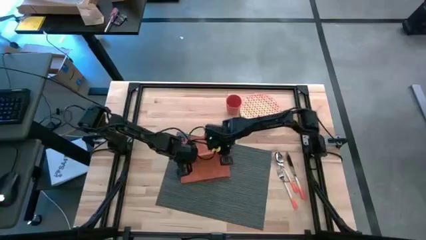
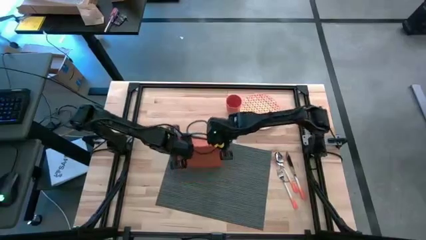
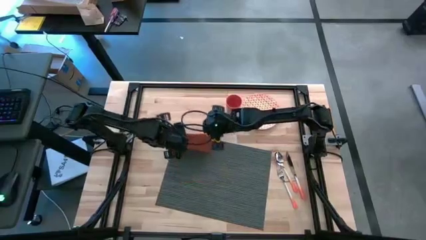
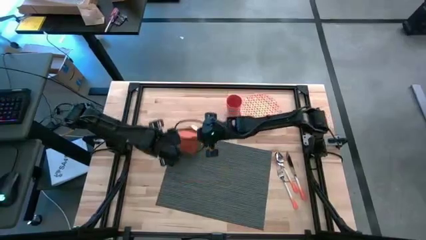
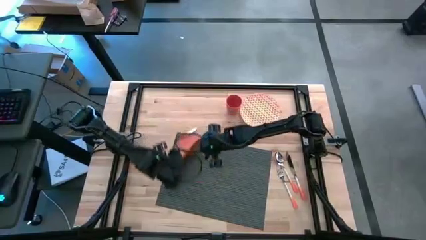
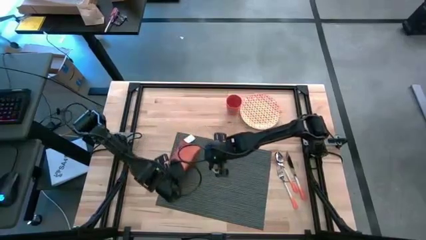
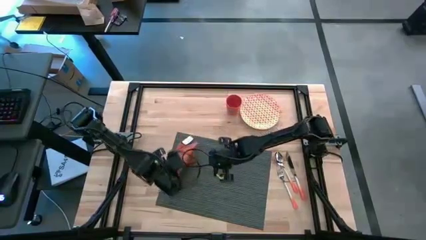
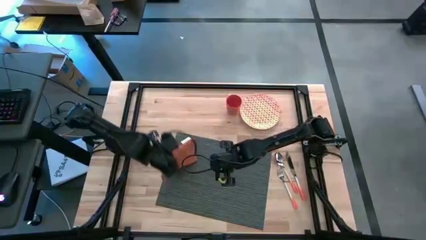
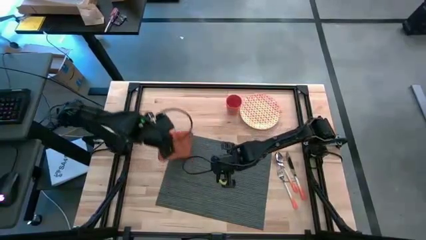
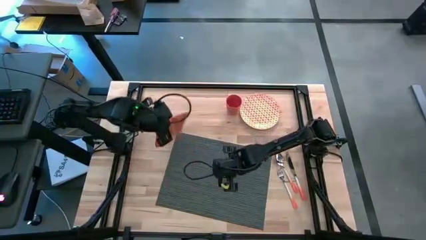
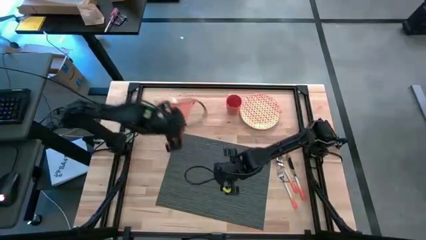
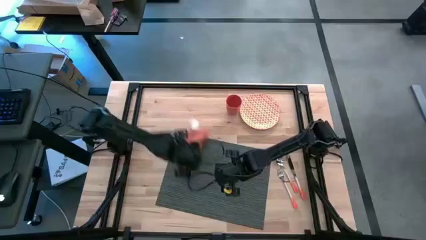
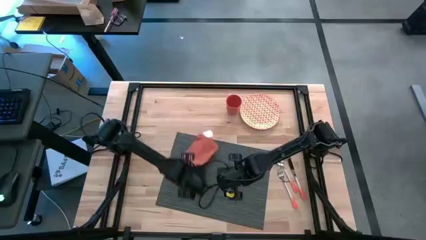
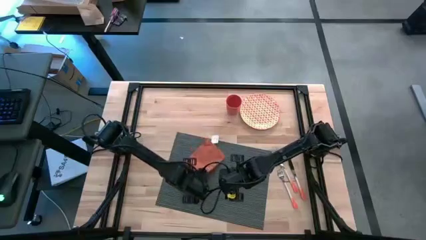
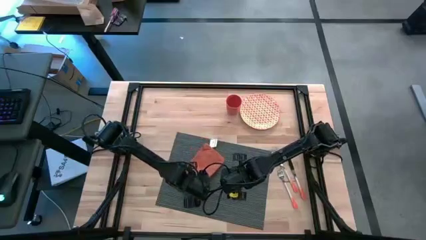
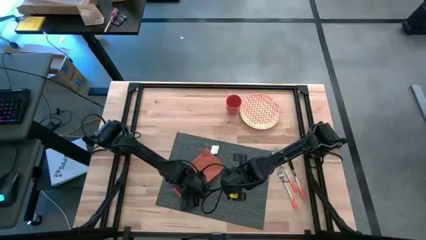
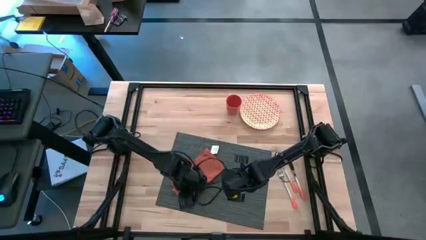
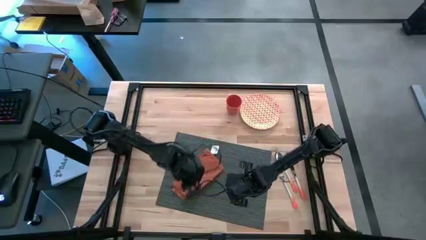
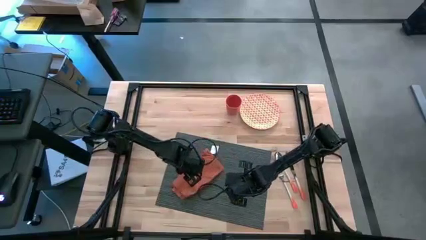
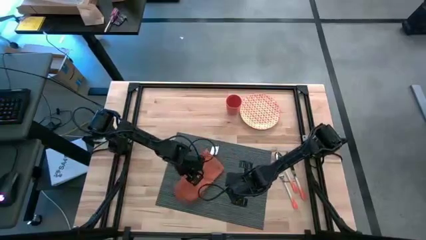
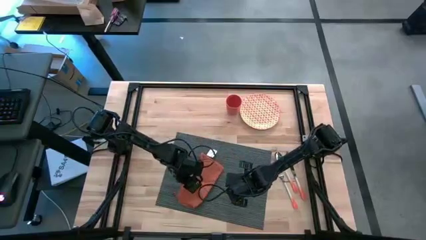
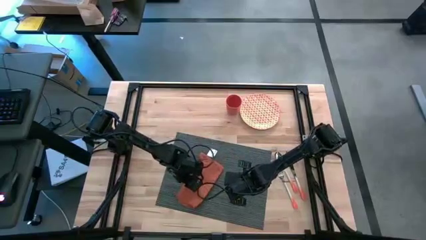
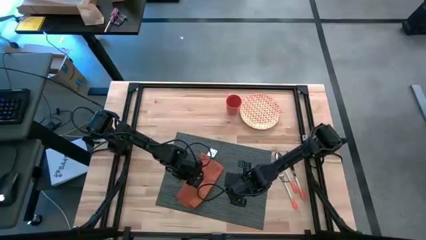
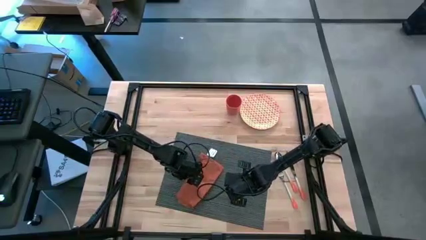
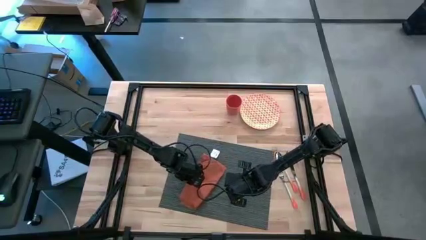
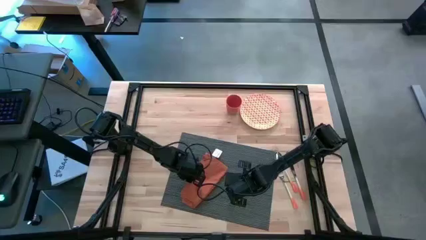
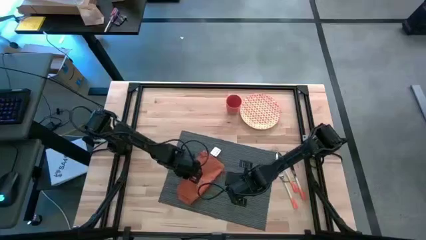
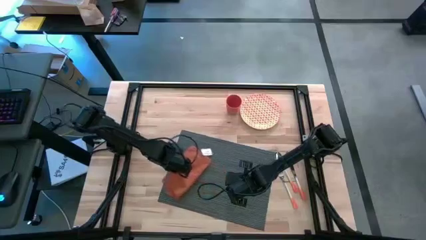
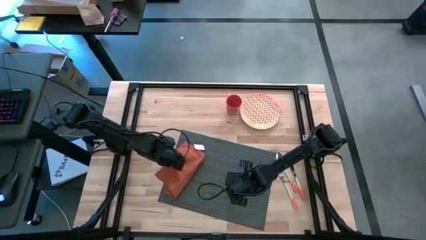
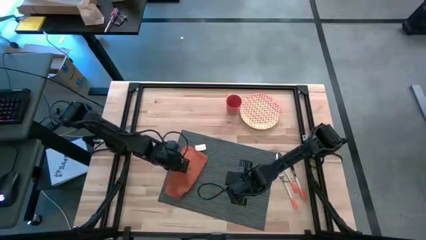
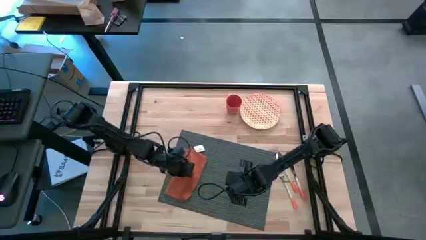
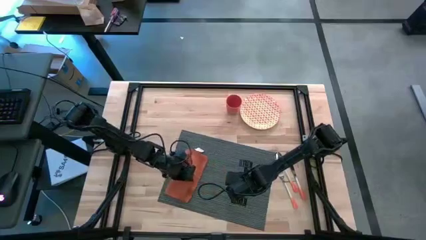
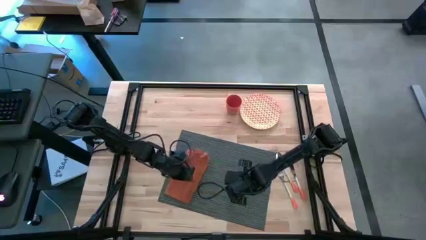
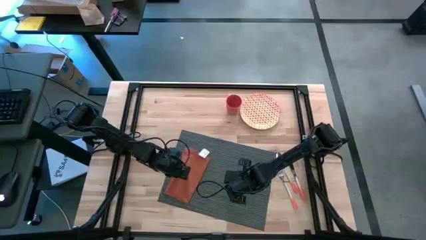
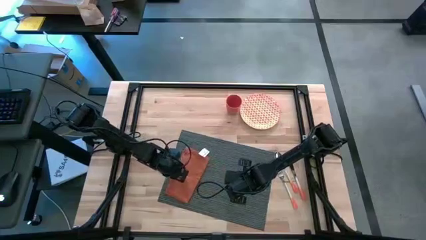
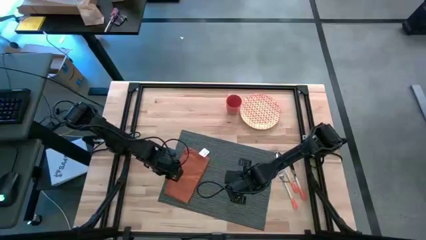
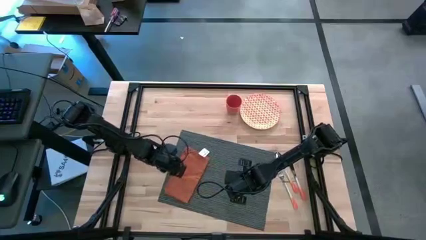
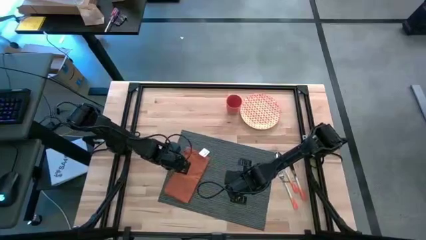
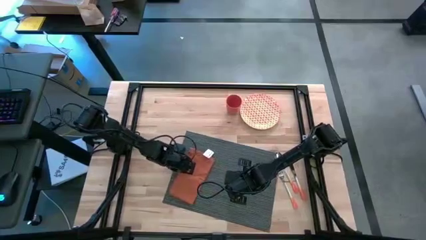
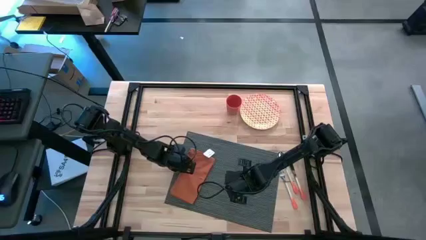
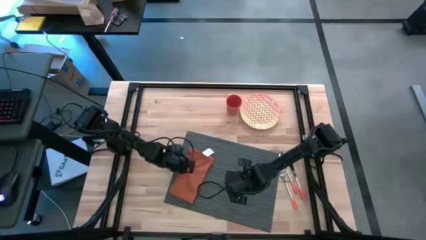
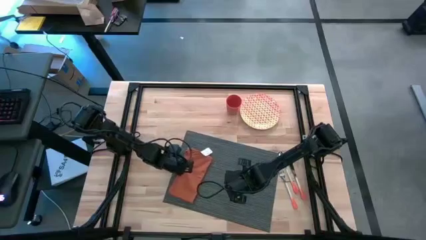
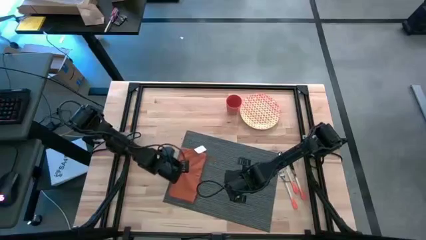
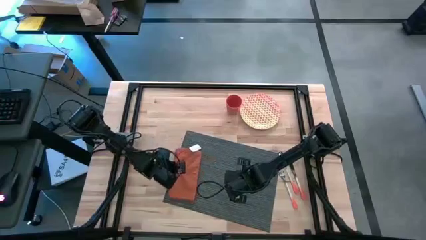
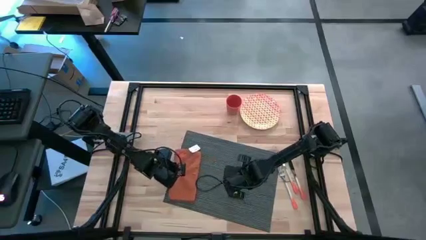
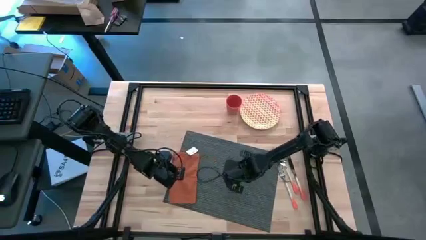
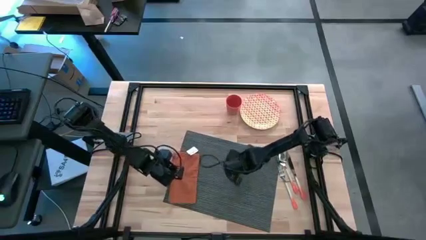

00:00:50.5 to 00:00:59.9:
Task: Set table place
Fold the orange table napkin

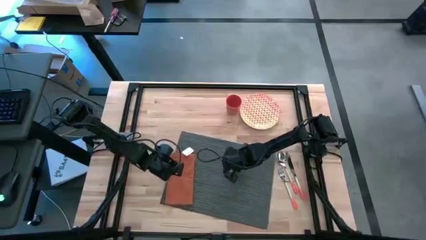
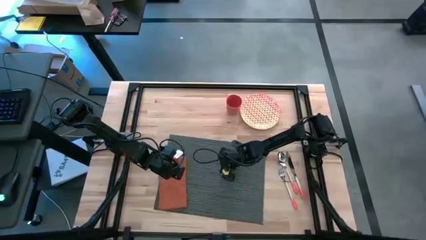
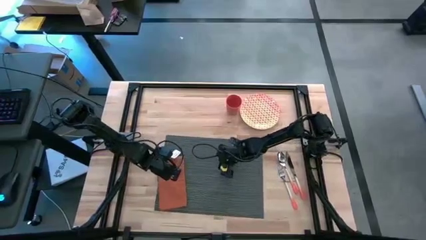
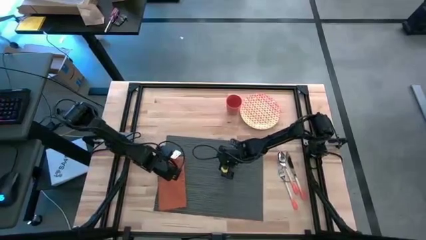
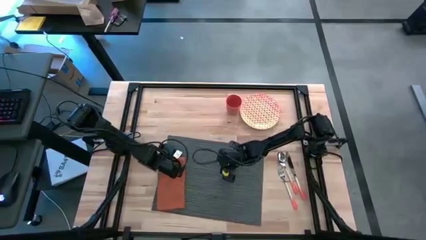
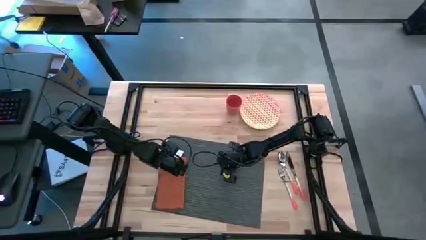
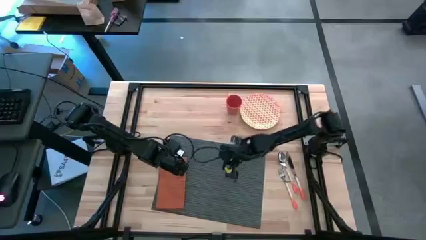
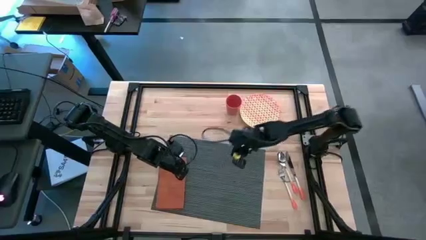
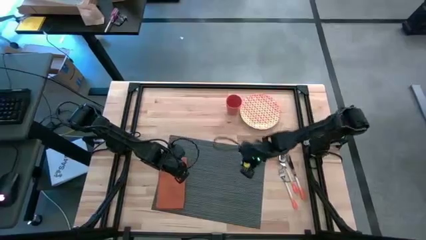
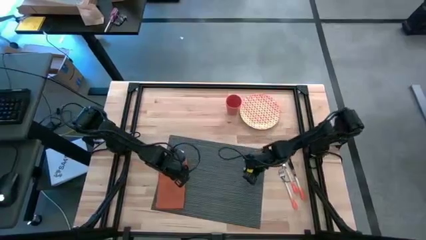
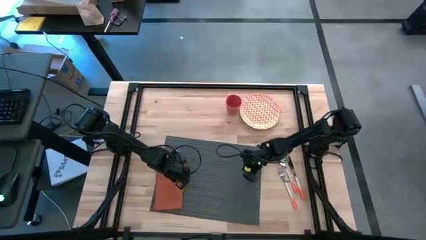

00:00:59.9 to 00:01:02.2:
Adjust the gray tablemat

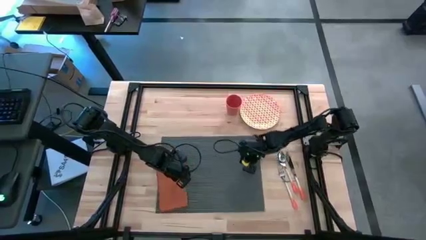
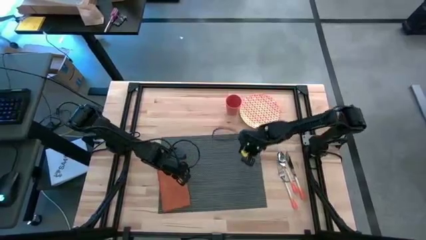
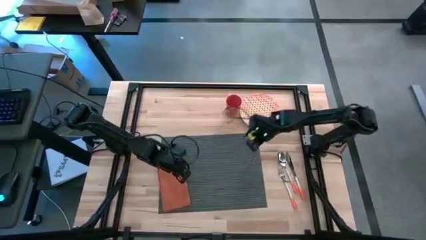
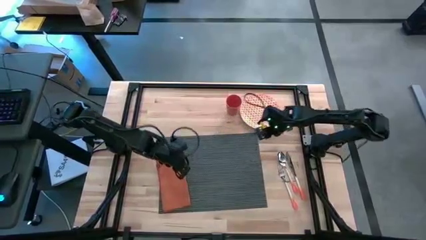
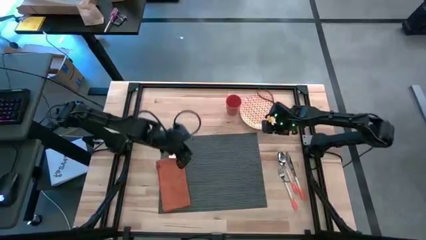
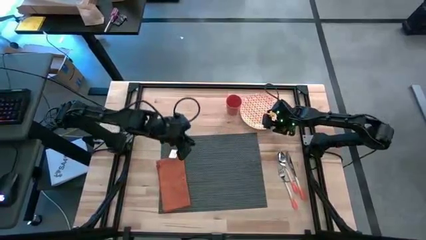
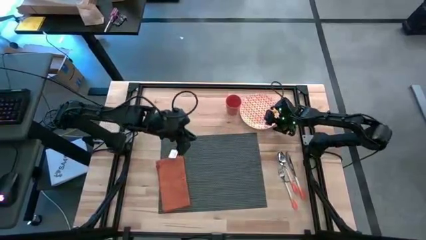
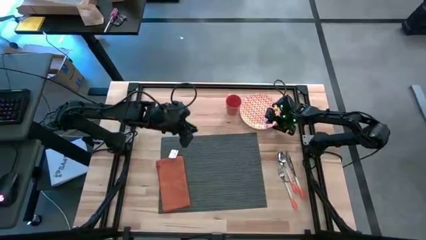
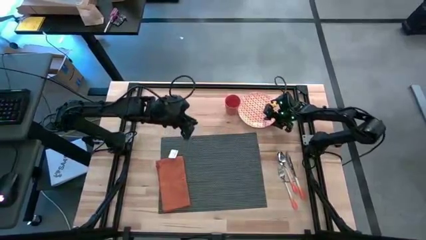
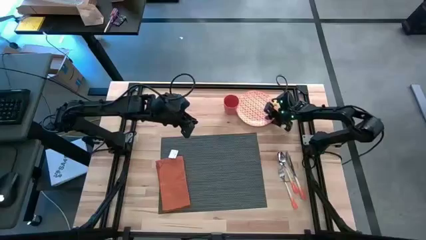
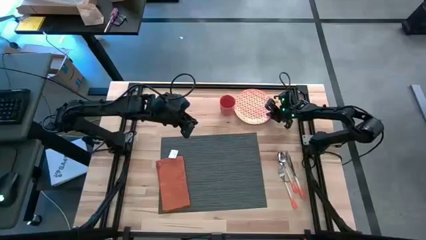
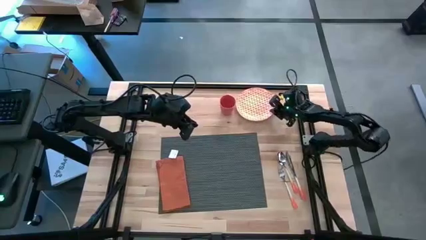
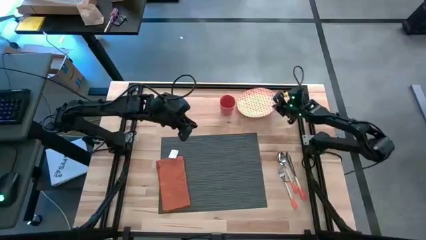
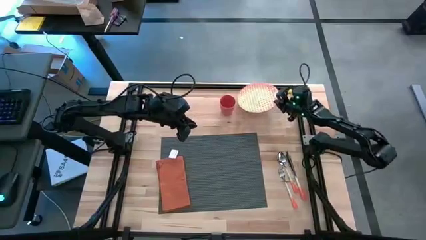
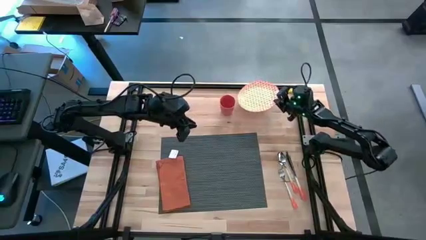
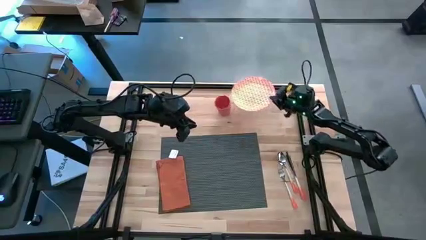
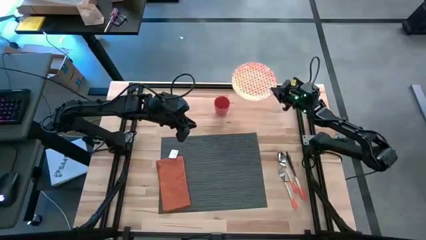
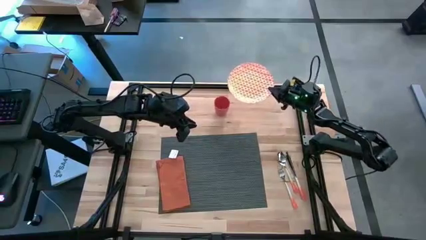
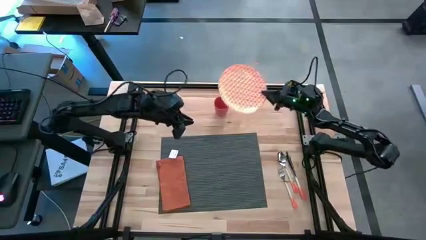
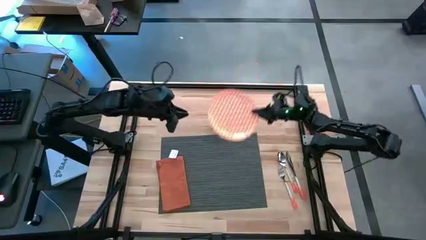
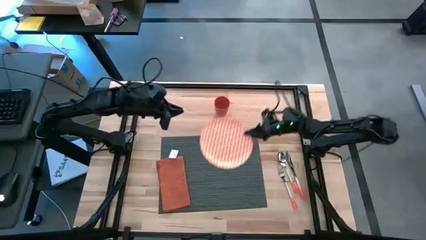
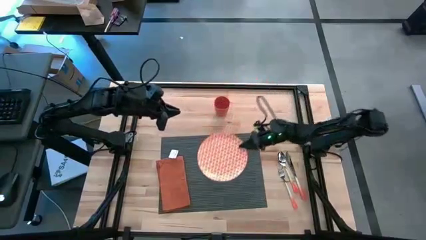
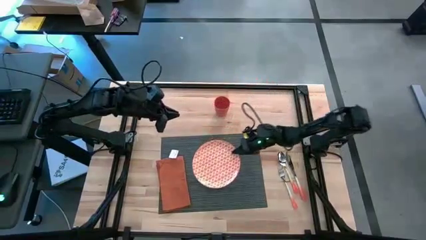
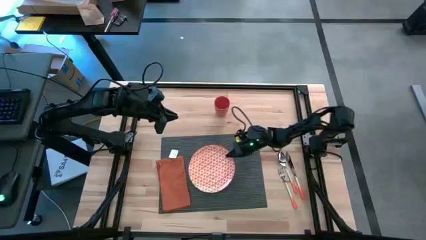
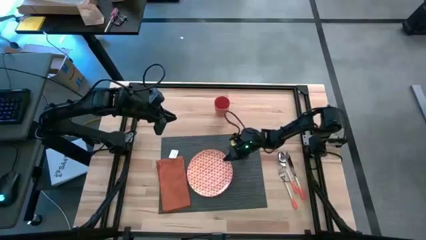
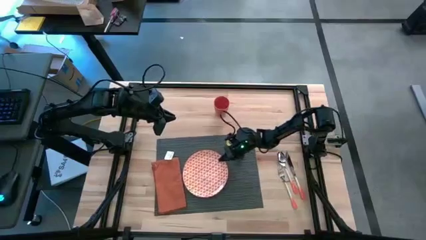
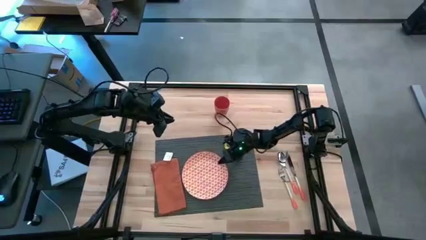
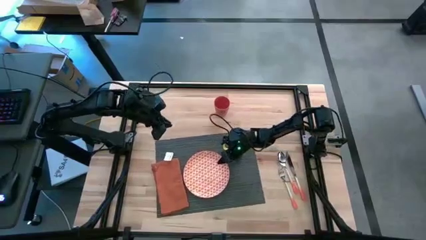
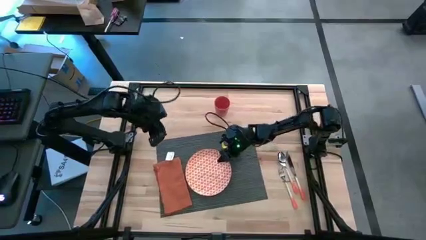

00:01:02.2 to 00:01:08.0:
Put the orange plate to the right side of the orange table napkin on the gray tablemat

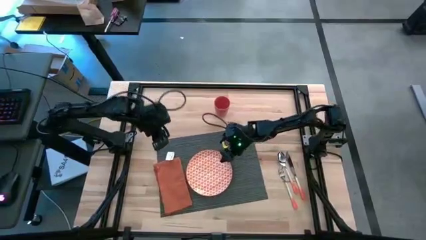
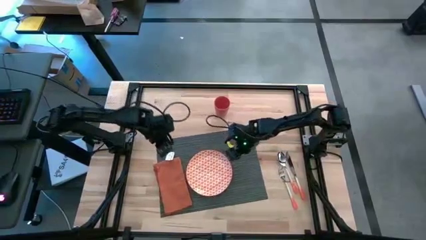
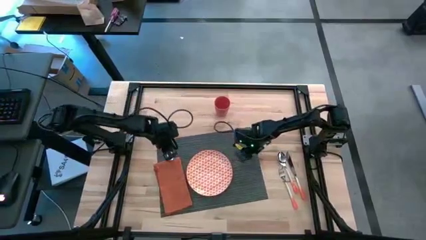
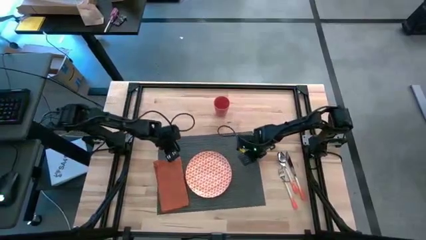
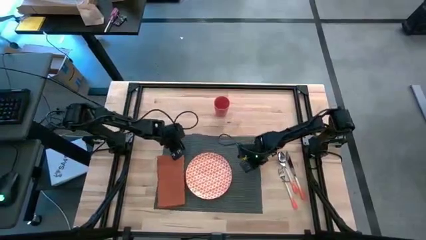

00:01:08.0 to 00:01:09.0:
Adjust the gray tablemat
